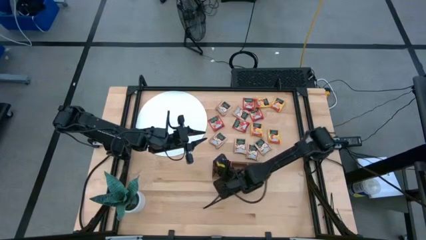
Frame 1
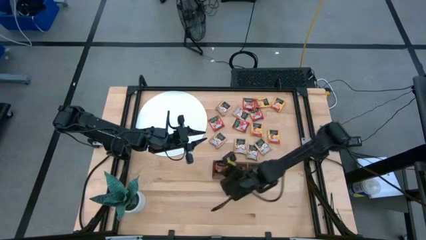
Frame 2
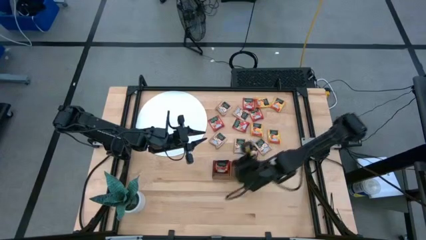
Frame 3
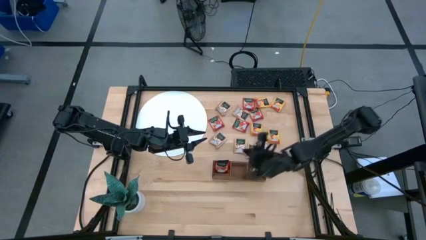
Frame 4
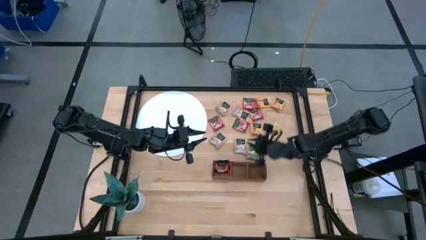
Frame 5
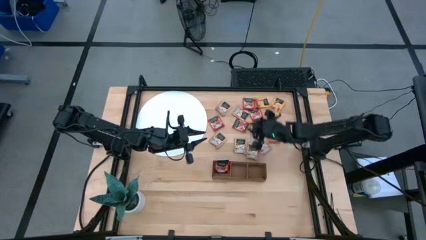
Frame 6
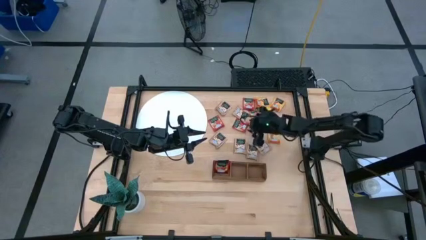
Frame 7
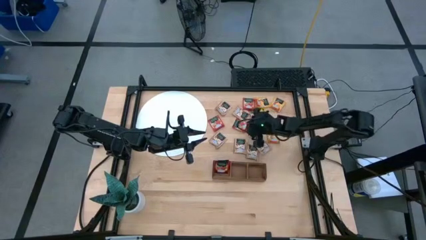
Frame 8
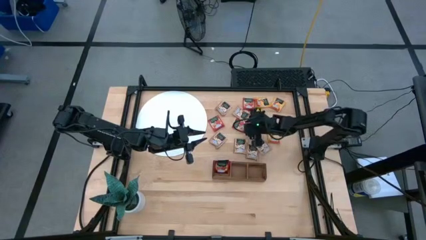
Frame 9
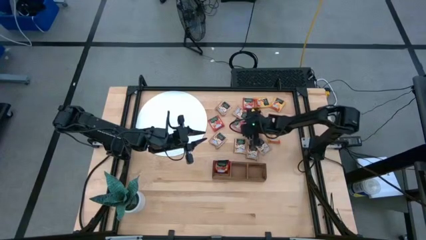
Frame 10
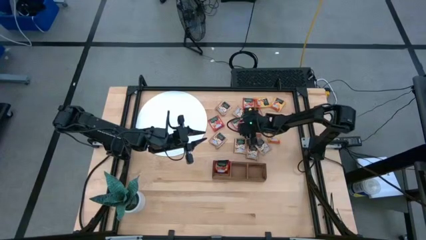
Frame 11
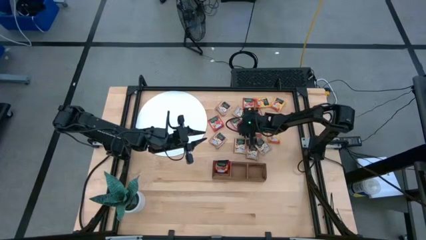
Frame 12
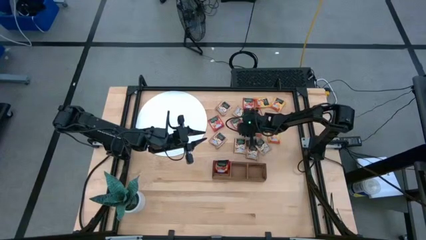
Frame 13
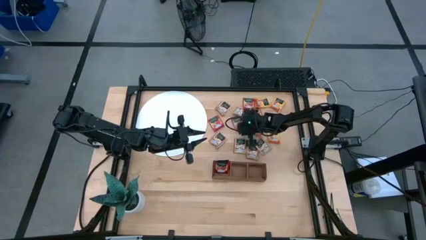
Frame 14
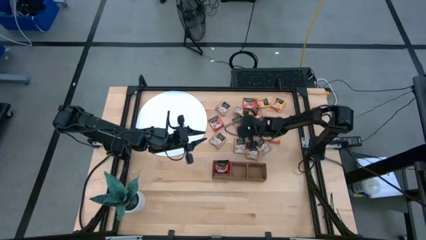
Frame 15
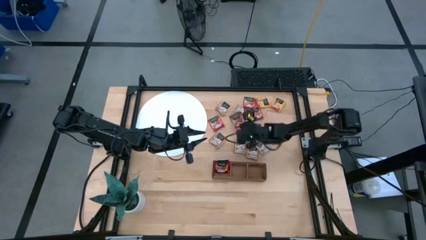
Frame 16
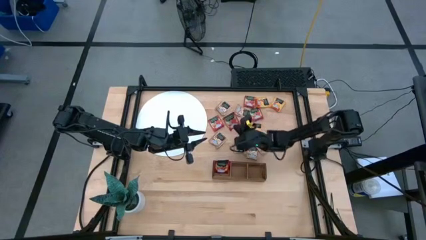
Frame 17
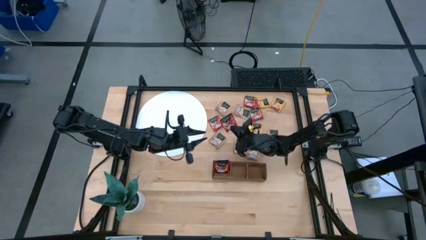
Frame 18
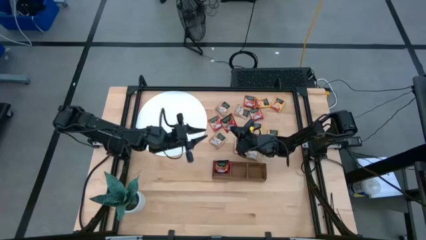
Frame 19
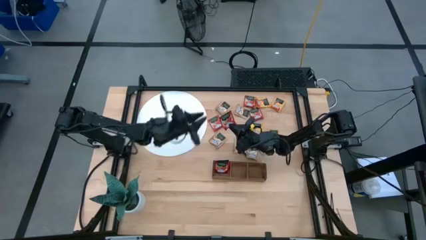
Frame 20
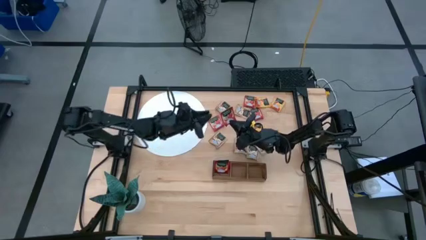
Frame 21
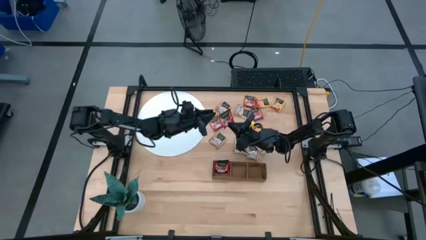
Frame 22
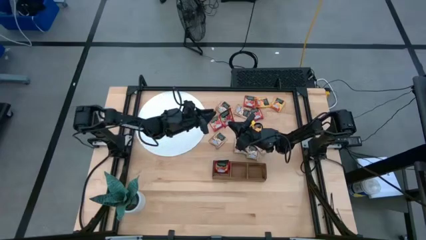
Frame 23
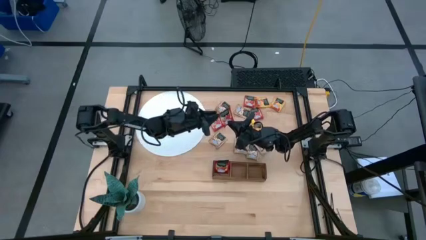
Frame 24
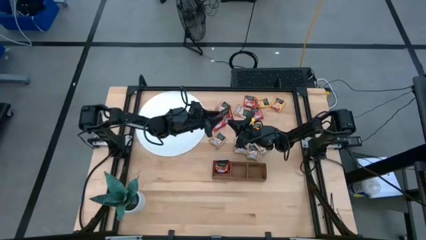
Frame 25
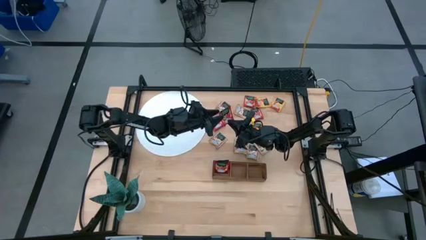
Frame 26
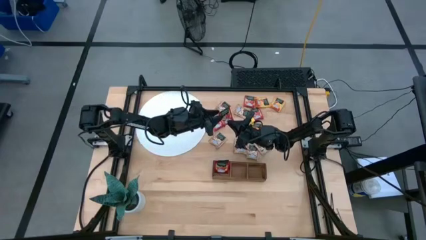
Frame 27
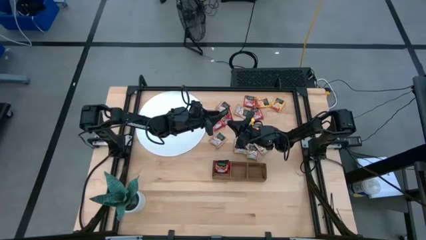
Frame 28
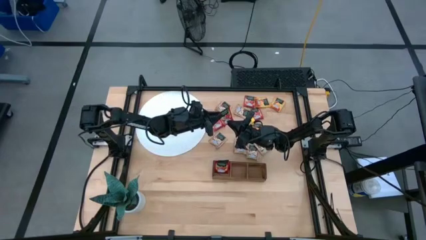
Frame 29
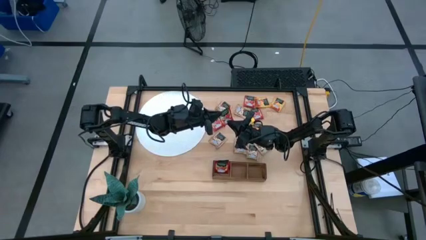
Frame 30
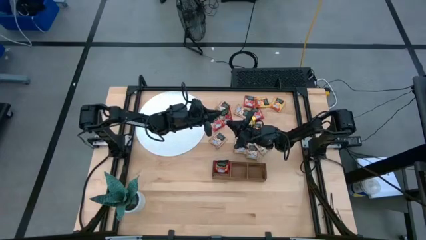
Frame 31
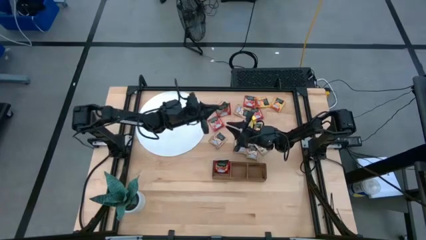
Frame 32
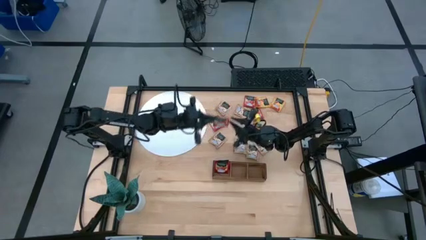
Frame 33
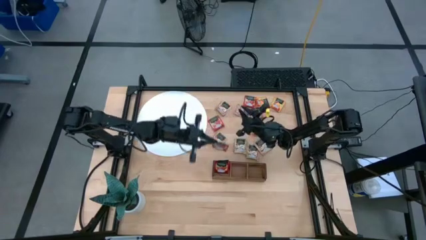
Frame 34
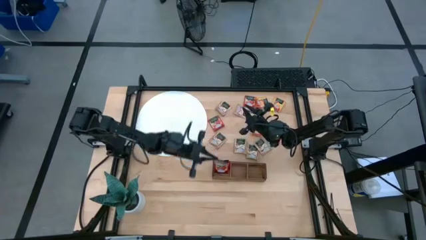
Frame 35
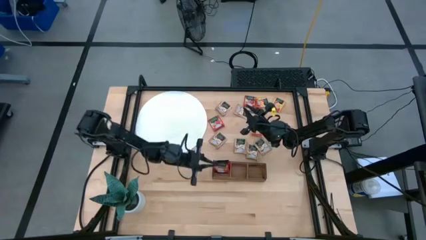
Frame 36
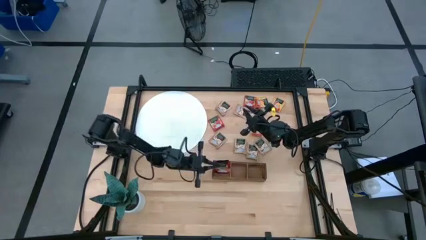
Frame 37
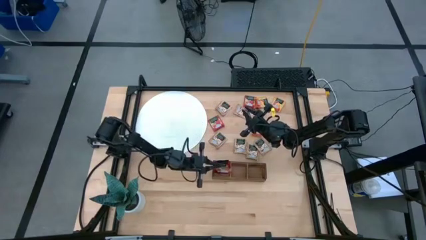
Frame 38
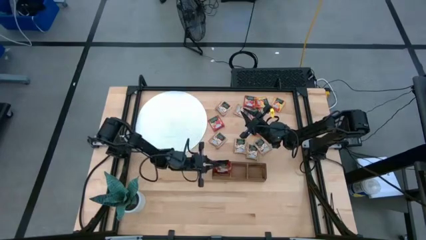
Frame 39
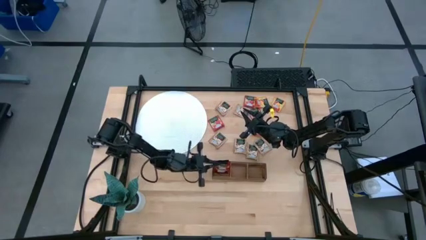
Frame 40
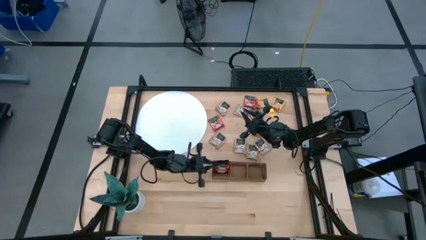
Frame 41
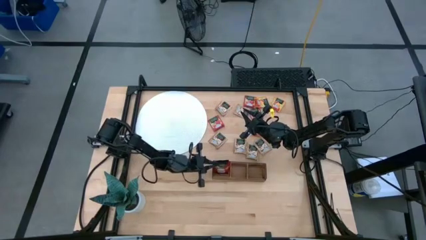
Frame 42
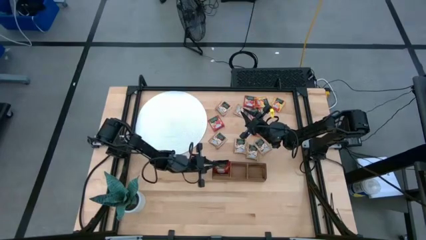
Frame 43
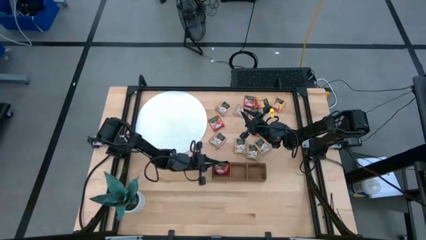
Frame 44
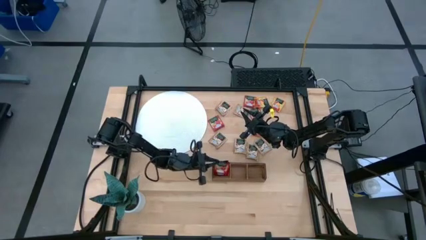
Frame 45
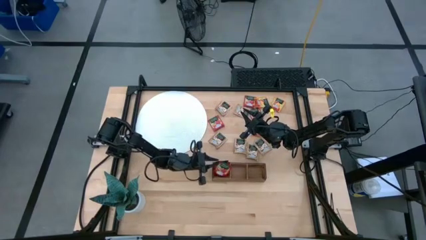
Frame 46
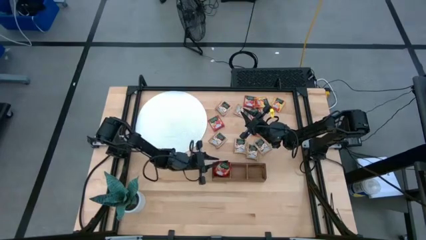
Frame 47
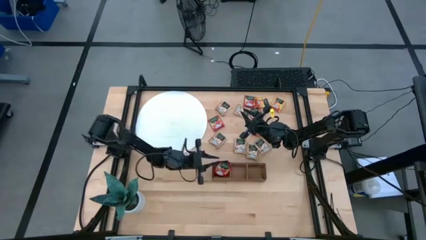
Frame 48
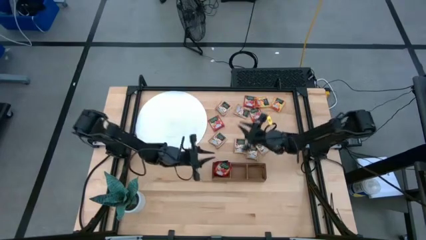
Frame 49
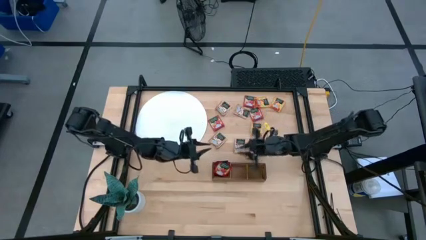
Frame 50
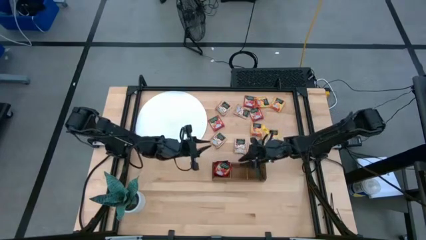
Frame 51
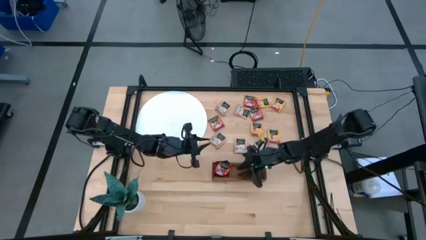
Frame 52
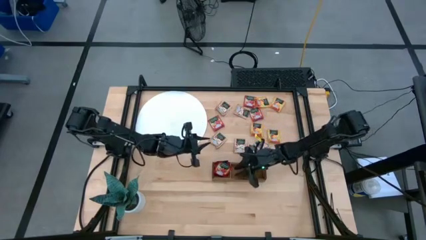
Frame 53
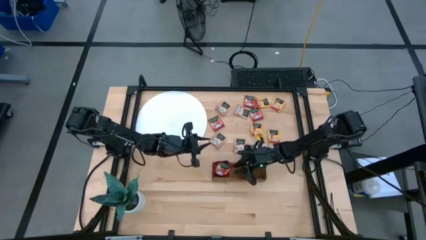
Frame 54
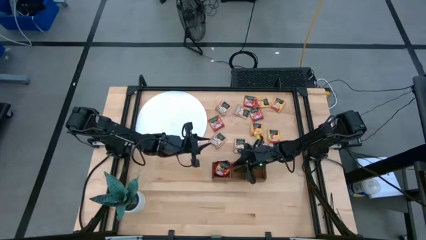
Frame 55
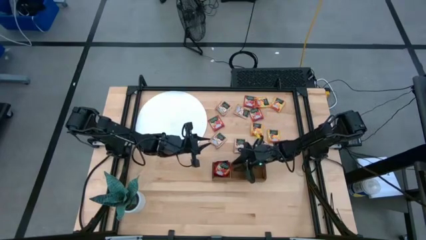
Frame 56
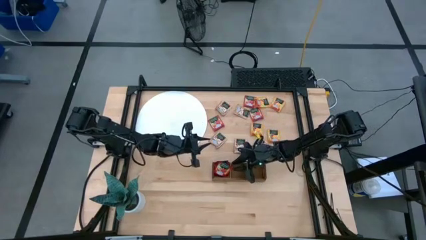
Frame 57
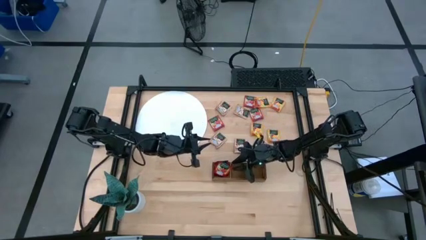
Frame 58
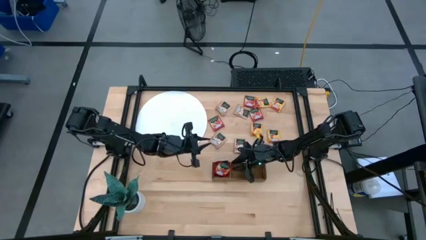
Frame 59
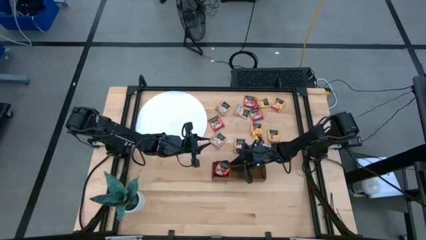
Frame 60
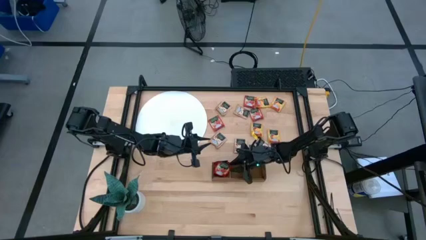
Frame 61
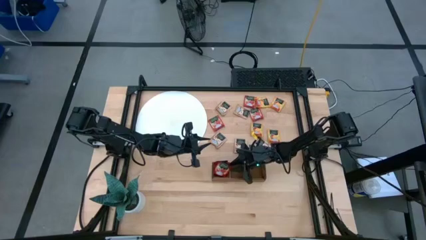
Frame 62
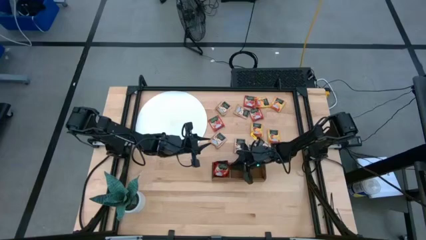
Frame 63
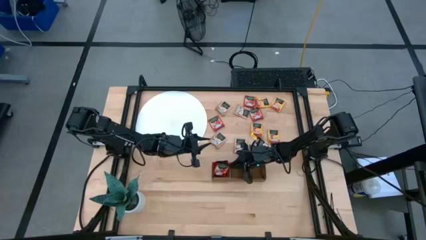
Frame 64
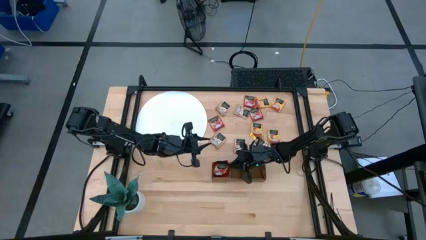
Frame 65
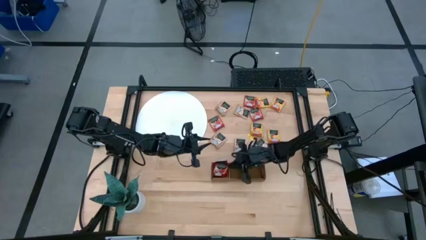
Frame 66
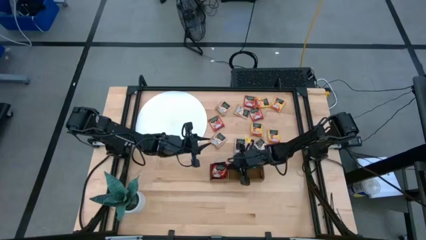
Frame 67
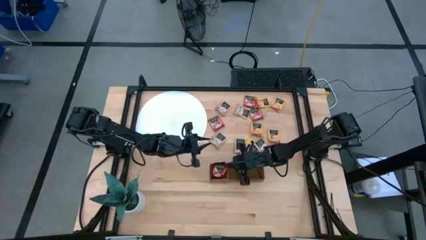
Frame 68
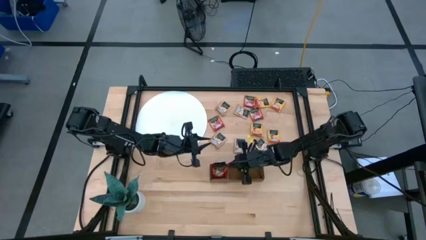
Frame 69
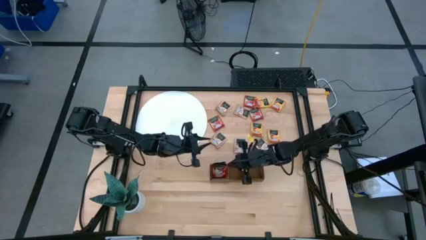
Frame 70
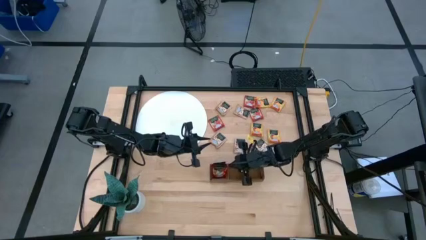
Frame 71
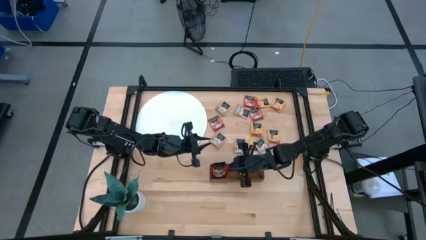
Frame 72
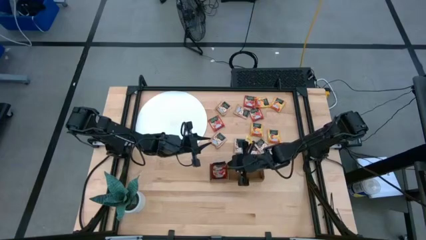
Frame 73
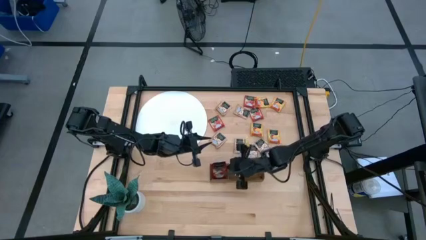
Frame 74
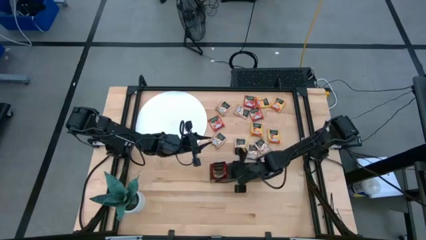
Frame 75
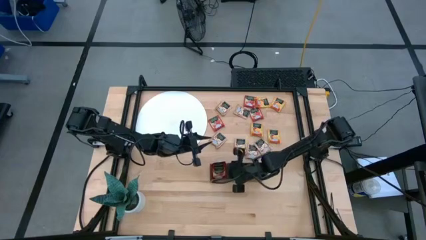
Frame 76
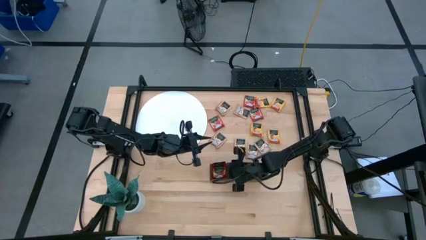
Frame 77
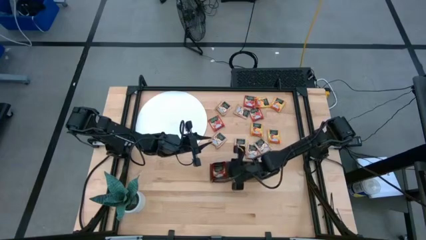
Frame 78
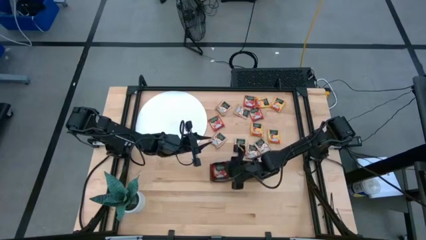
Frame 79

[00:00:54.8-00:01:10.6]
Task: Pick & Place Tea
Put the red tea bag into the left section of the wooden organizer

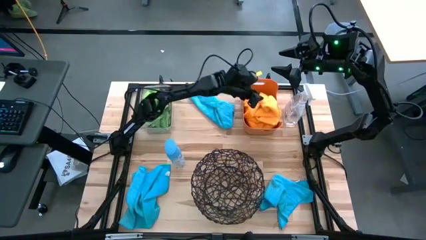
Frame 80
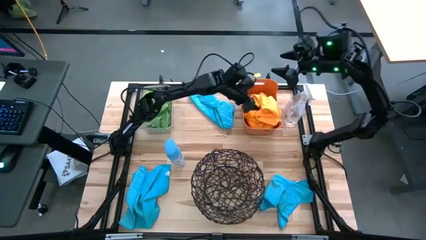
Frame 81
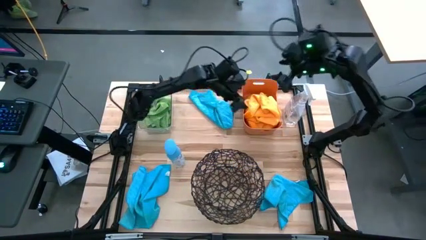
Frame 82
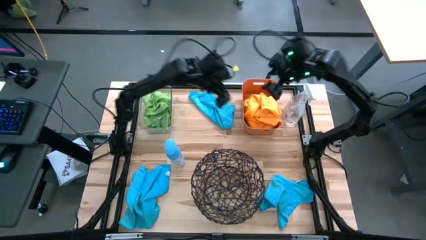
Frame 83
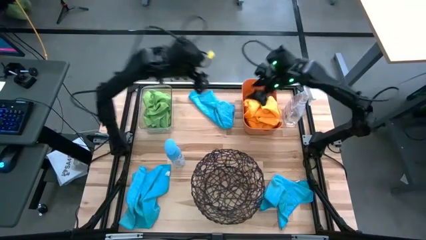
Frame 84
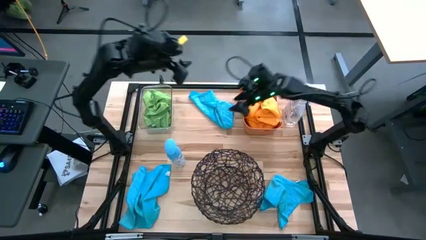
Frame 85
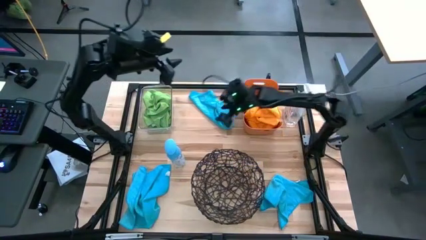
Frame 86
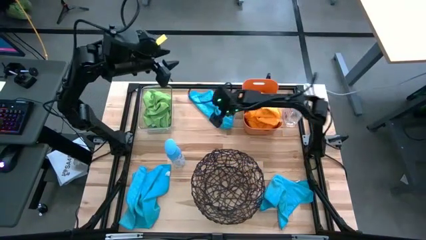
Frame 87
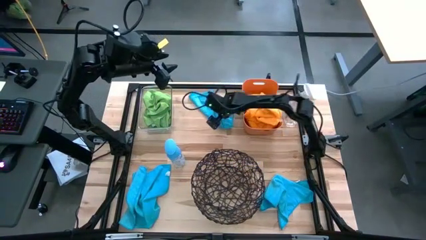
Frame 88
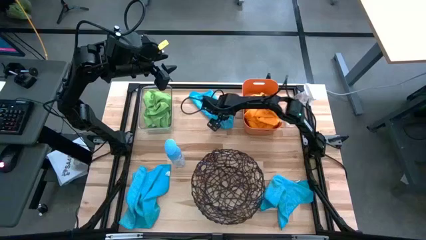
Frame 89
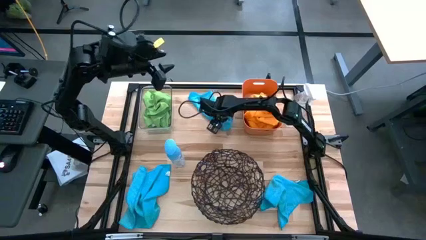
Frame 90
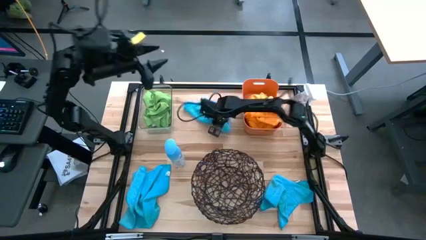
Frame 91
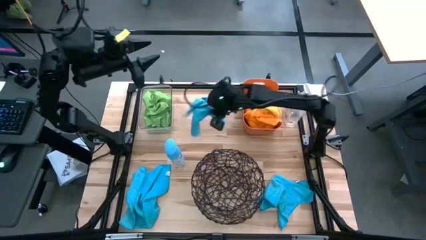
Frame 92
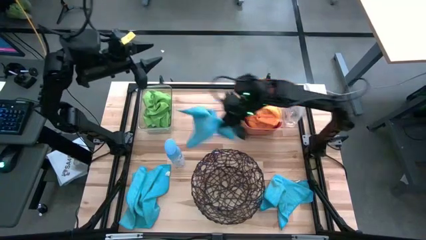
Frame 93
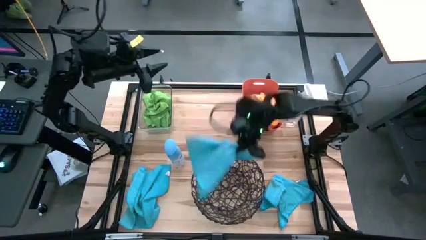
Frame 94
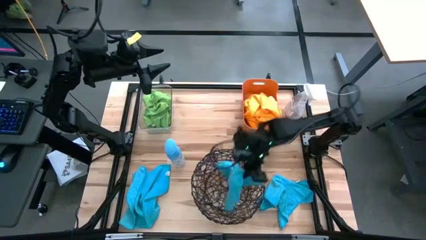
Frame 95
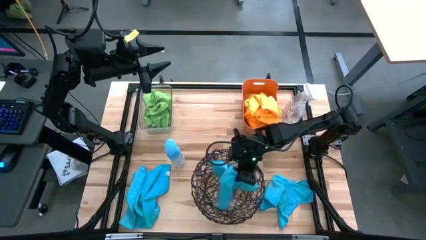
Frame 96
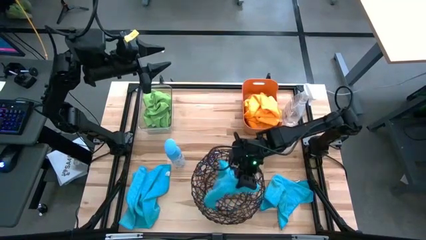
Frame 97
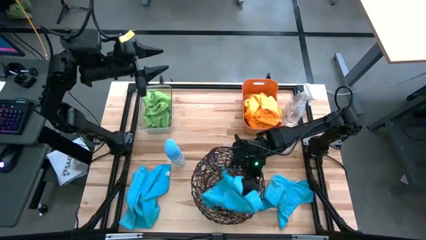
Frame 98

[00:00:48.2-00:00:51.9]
Task: Sort microfiber towel by color & place in baskets
Put the top blue microfiber cloth into the black wire basket
